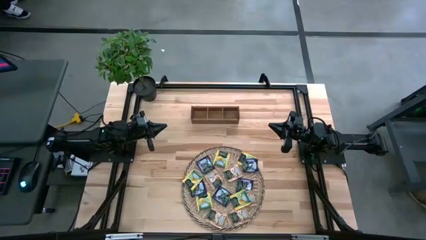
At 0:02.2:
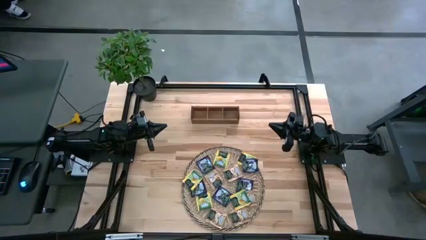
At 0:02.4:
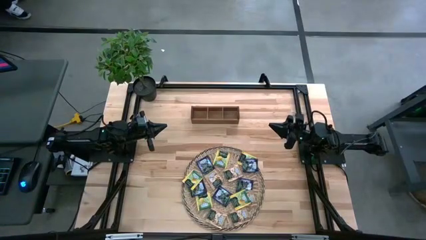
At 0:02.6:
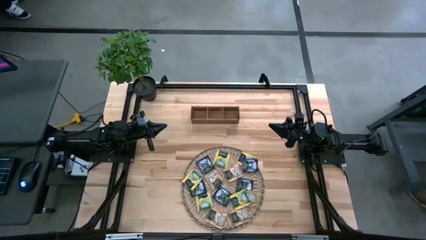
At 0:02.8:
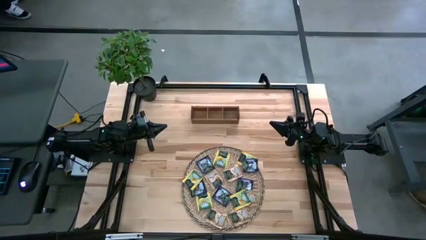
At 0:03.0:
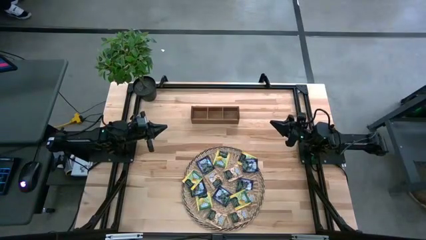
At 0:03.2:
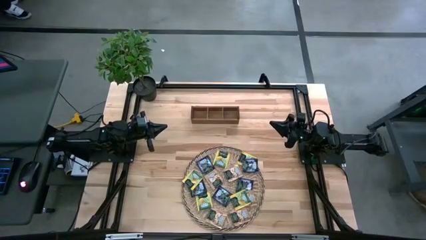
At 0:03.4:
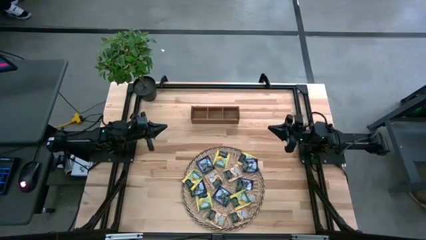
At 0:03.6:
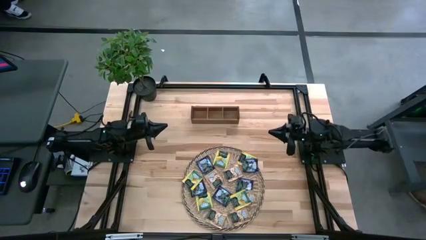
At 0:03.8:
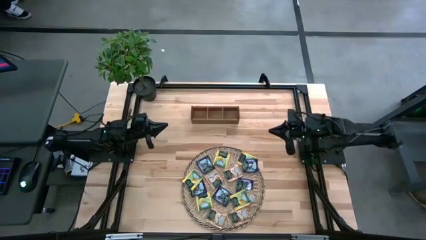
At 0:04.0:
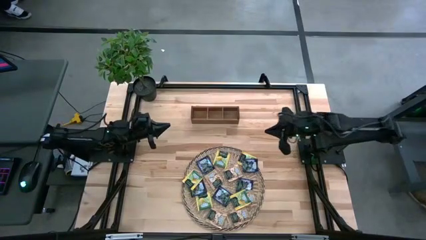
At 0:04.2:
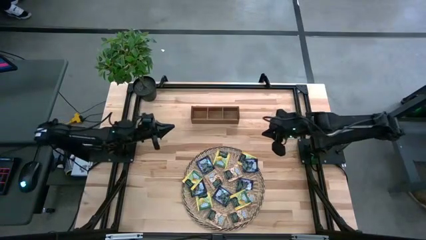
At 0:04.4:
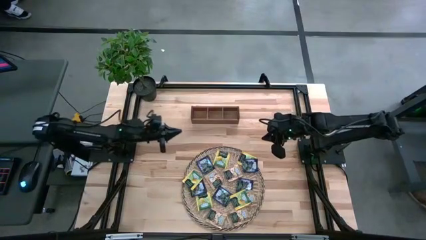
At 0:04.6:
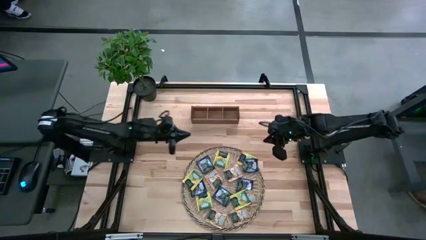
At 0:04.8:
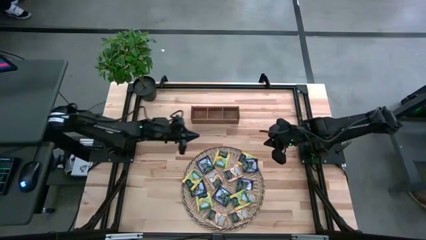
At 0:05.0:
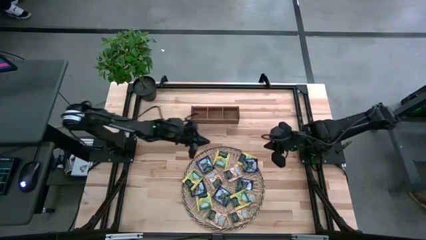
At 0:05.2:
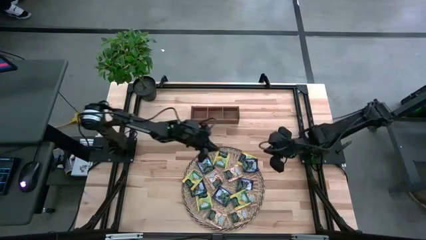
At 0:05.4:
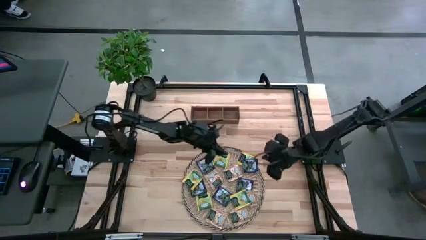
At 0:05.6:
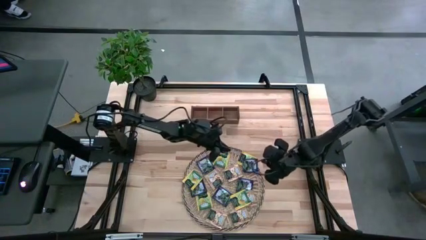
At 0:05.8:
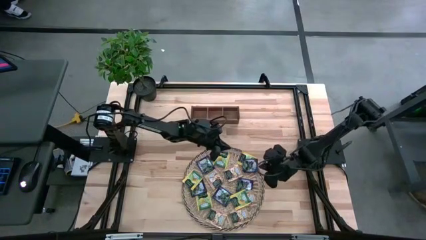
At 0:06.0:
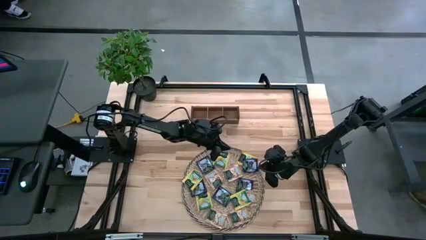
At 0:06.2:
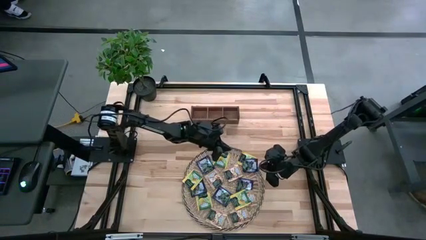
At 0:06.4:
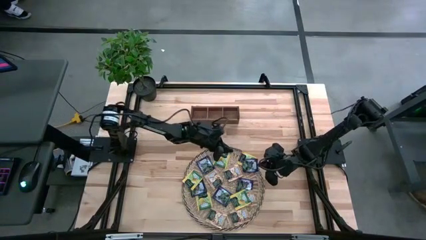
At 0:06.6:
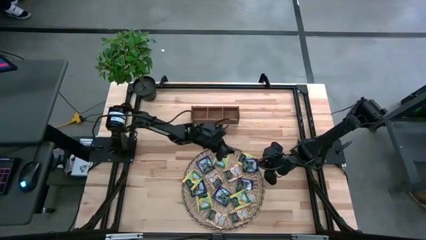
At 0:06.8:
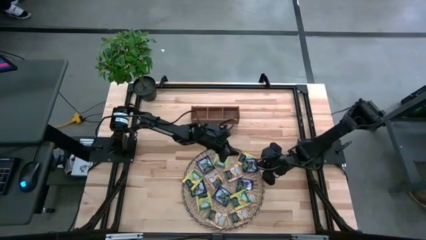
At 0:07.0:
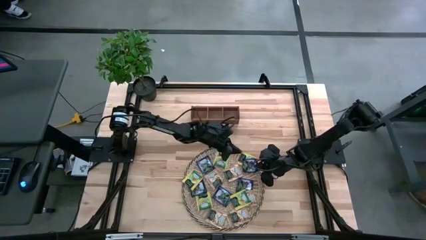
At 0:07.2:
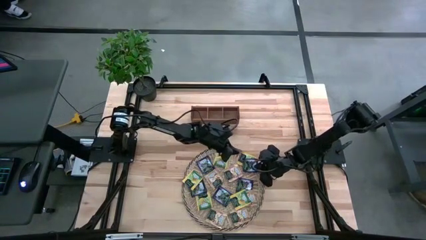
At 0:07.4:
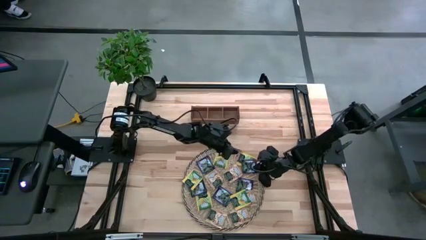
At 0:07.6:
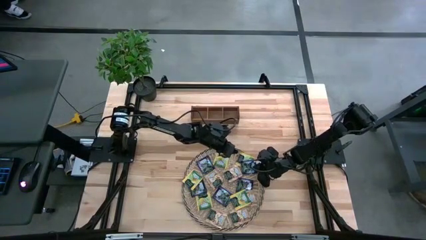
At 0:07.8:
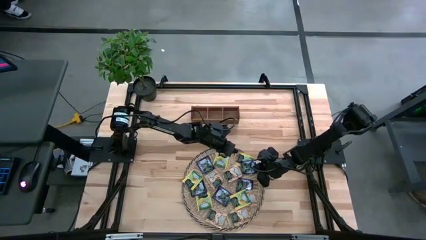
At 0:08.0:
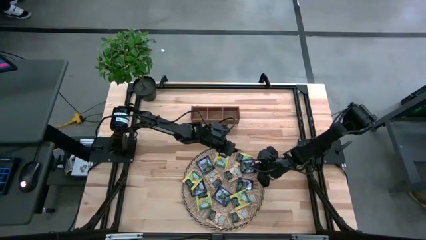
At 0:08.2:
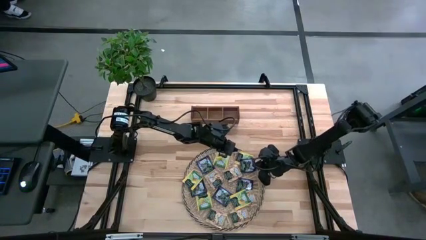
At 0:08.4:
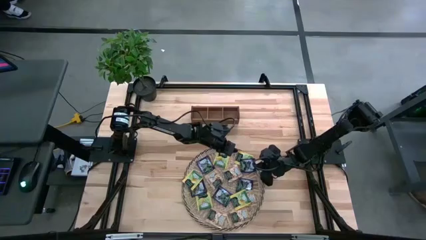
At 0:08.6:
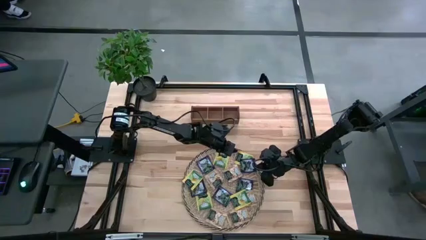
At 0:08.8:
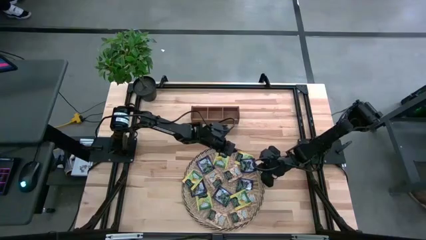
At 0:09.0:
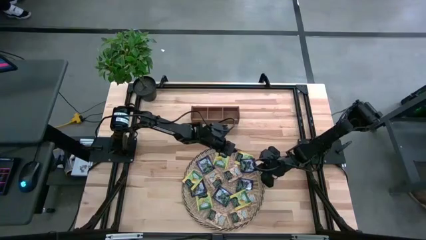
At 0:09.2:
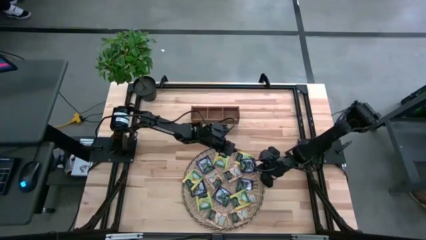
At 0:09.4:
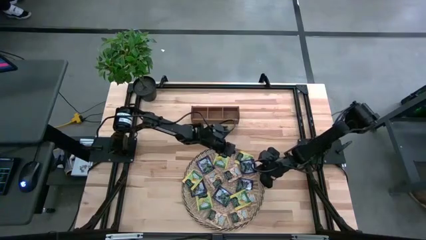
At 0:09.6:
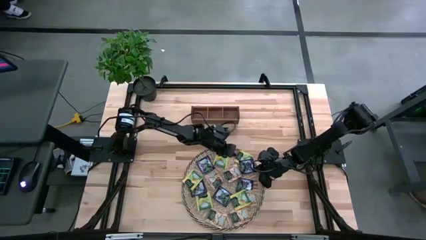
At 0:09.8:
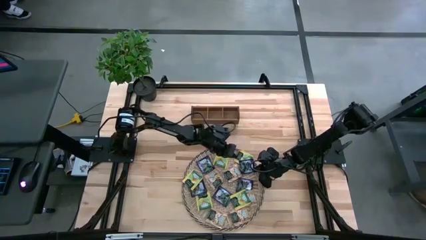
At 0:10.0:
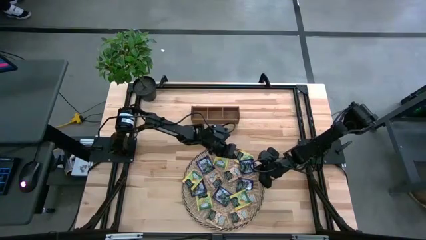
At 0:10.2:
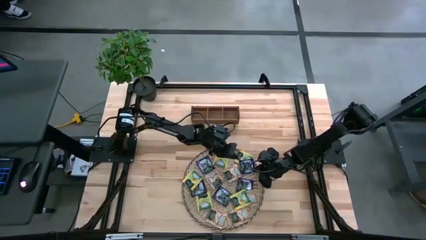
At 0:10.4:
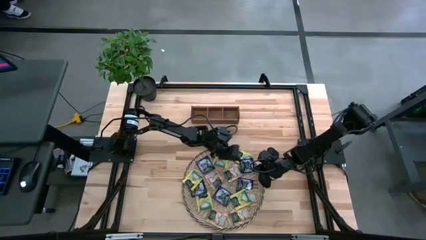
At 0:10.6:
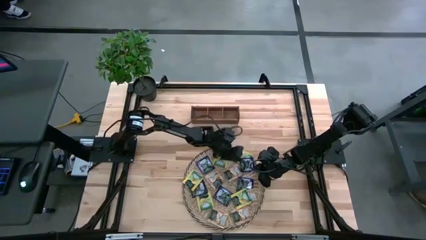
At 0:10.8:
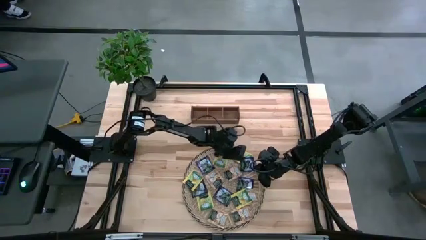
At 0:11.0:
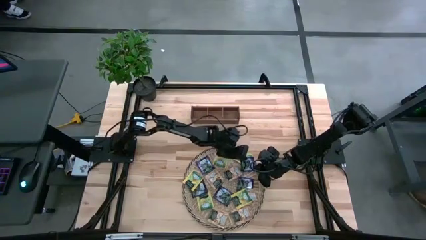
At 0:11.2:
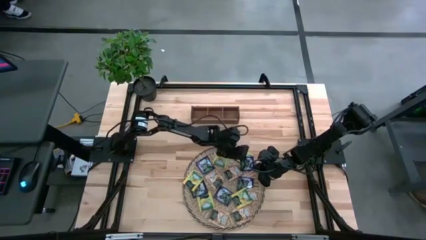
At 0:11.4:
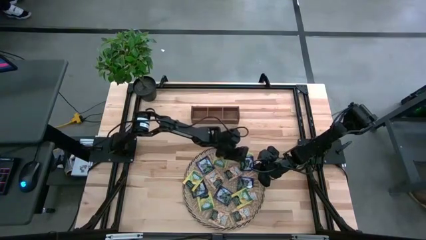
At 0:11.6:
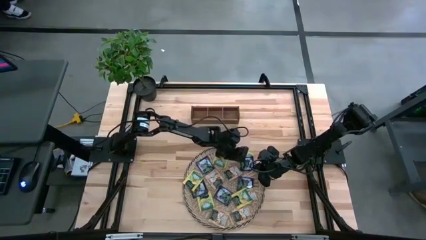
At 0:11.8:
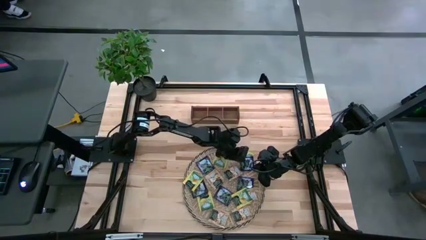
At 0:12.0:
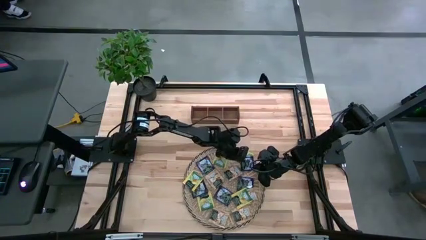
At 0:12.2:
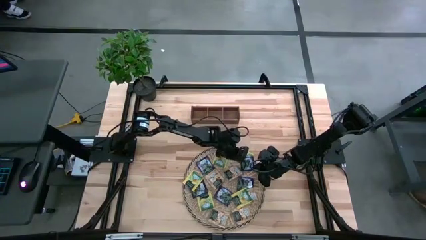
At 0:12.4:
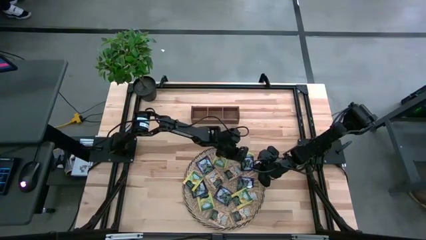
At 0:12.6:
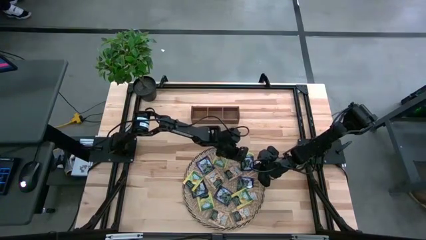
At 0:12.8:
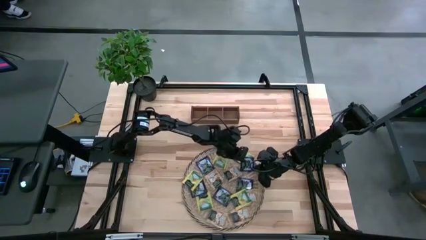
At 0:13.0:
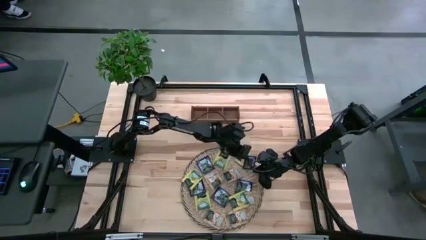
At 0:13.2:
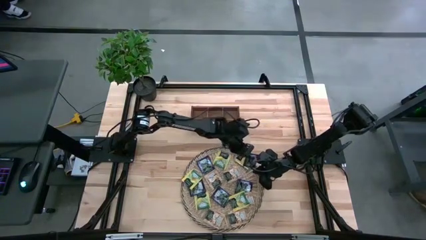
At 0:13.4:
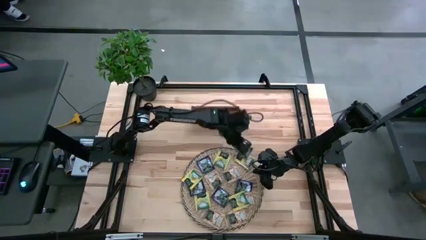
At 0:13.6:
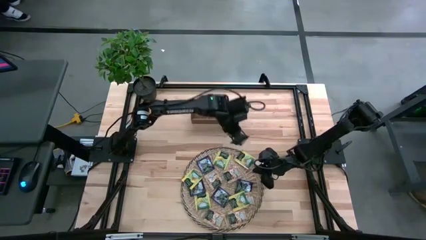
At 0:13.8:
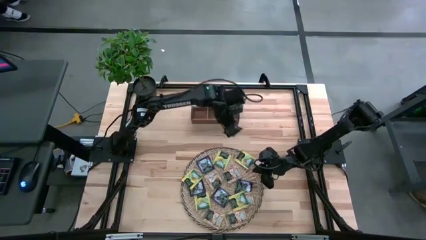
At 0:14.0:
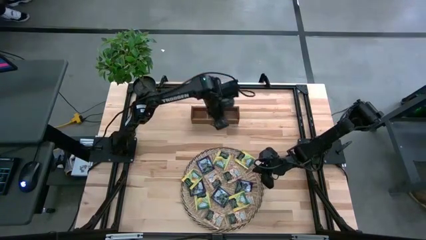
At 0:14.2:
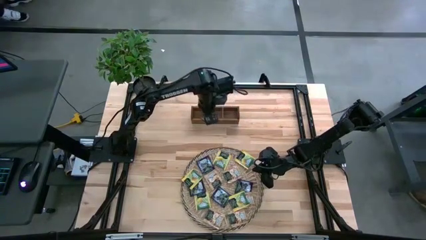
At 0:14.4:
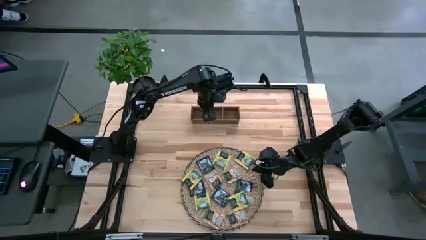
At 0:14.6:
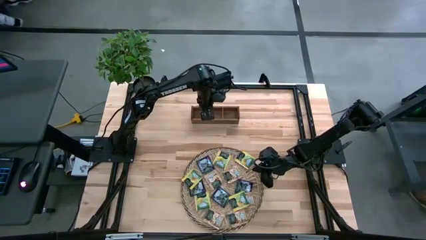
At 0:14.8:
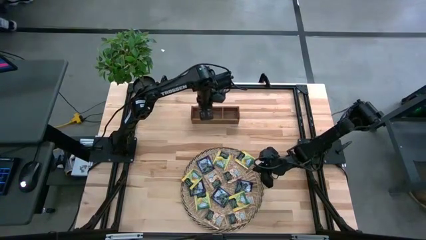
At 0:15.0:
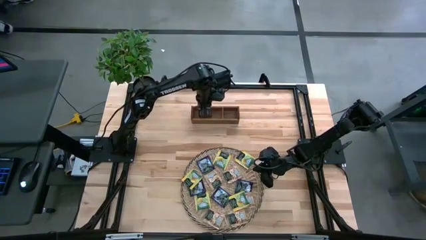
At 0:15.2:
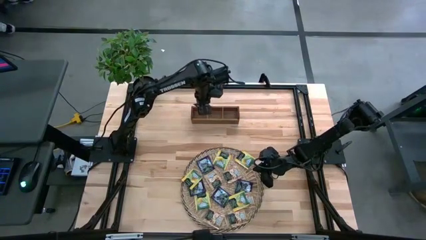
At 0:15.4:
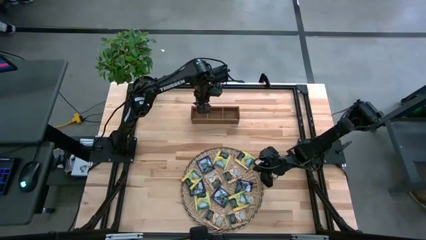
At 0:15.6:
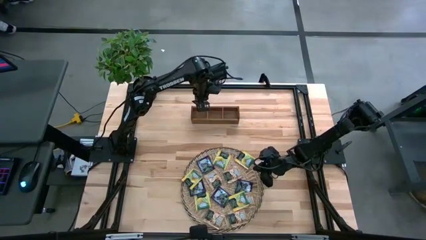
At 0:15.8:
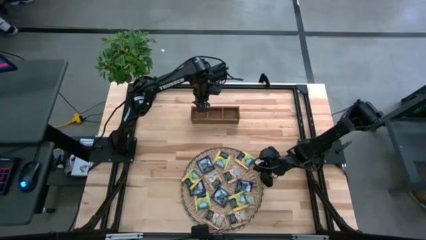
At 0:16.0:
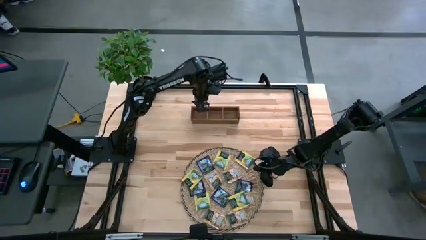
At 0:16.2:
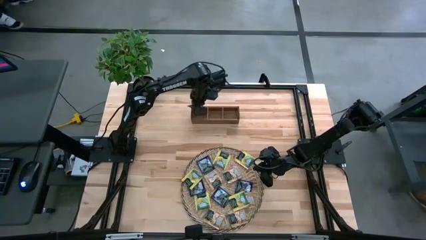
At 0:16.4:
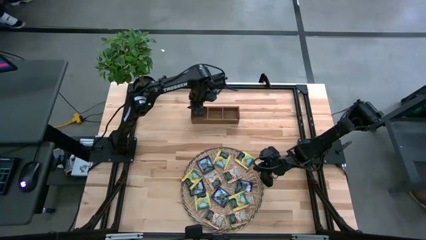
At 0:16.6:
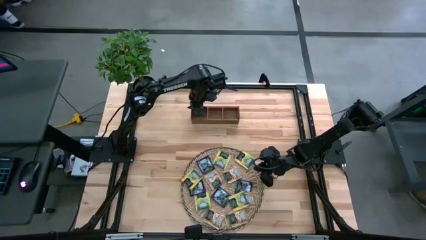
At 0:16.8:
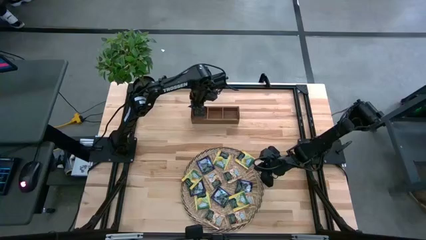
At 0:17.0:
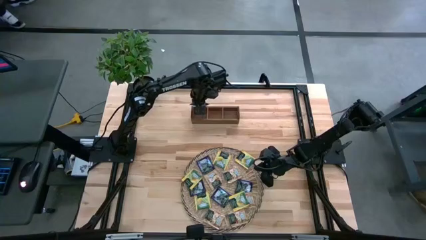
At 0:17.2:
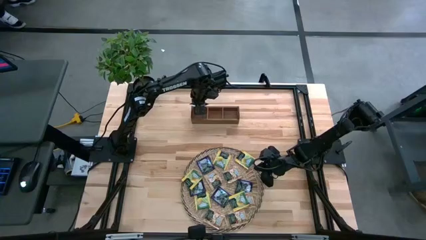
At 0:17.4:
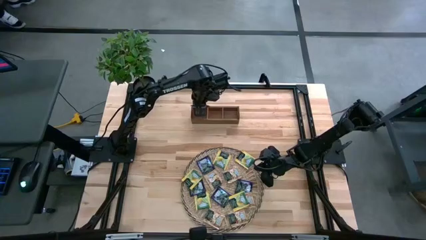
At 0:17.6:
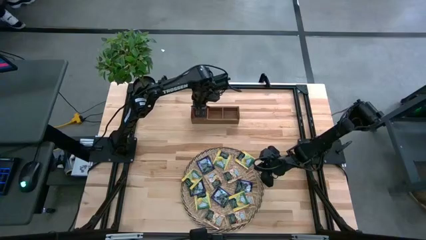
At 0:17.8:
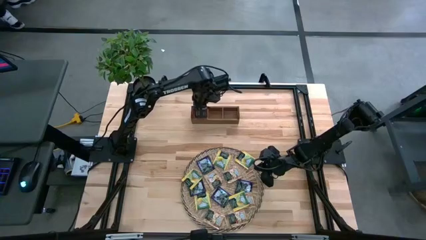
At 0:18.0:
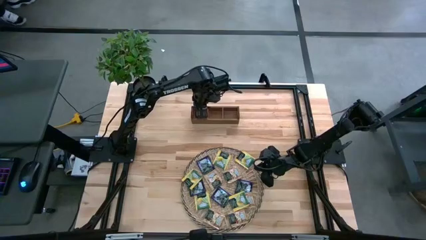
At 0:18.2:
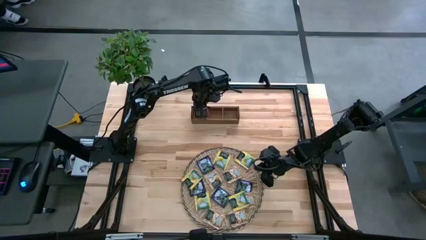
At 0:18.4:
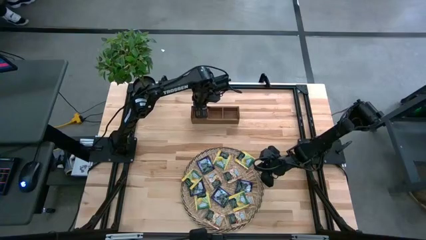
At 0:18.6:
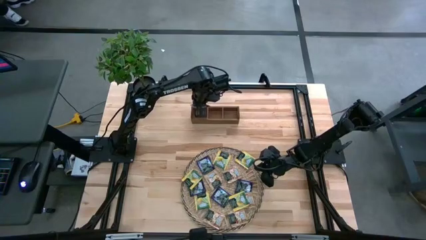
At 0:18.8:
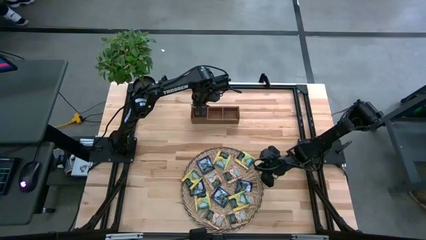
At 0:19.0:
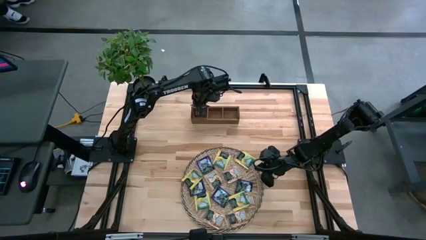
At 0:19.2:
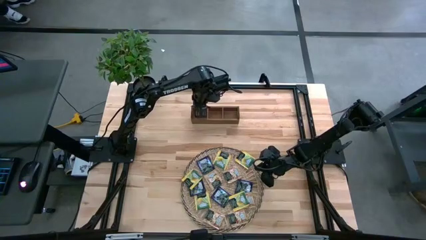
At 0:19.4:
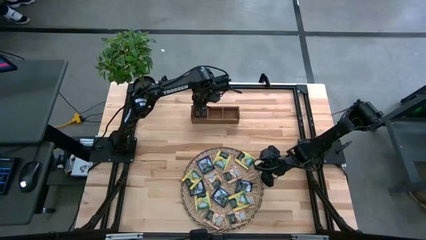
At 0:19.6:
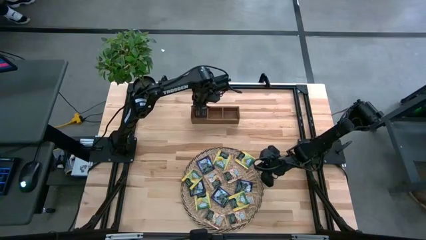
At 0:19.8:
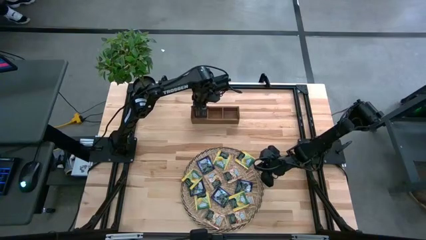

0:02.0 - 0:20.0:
Task: Pick & Place Tea
Put the purple tea bag in the left section of the wooden organizer
